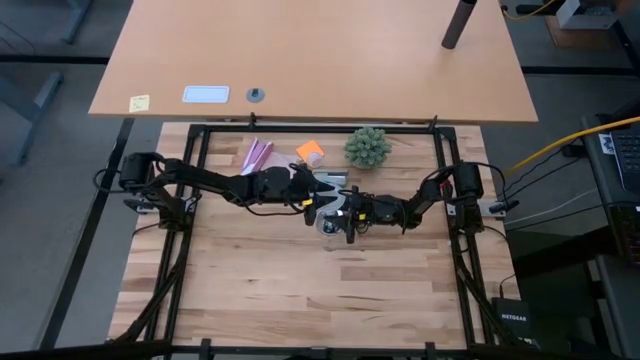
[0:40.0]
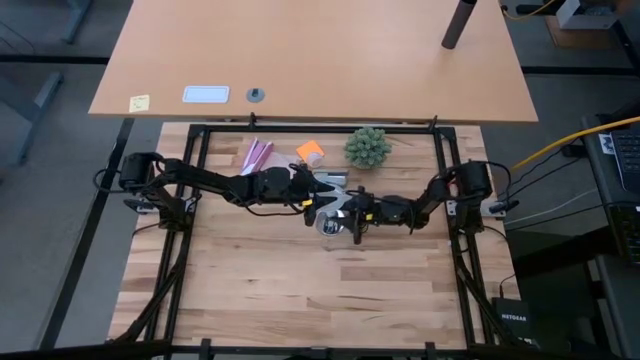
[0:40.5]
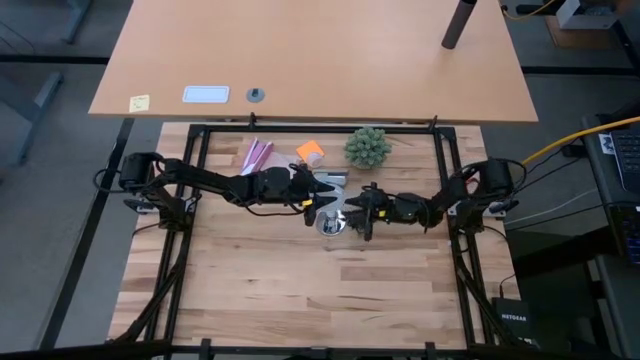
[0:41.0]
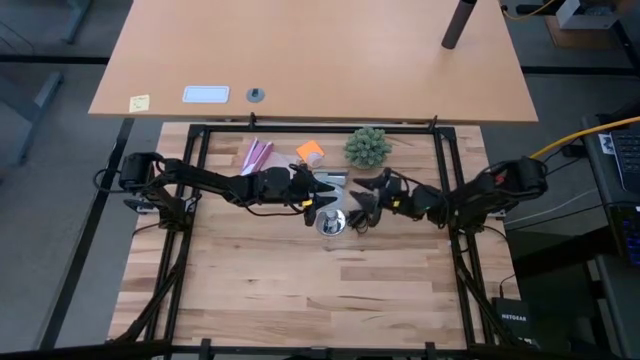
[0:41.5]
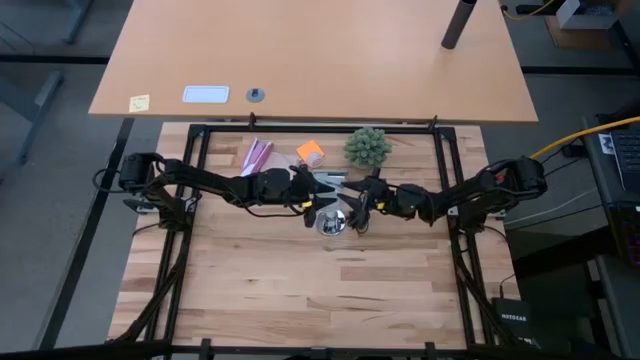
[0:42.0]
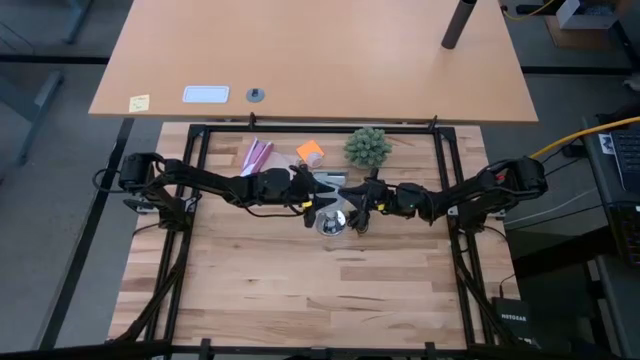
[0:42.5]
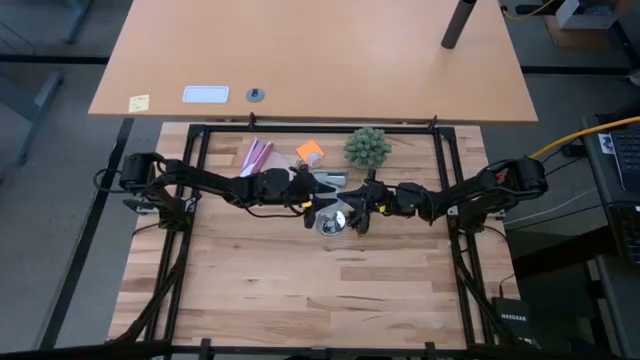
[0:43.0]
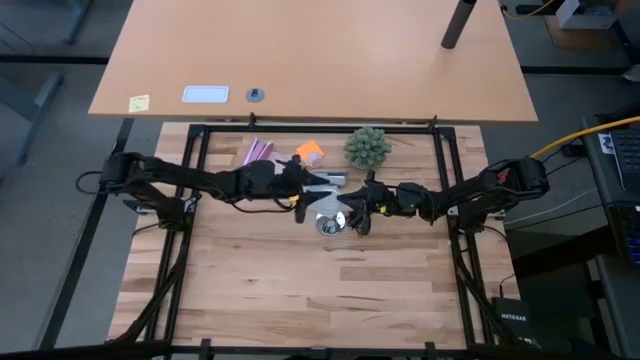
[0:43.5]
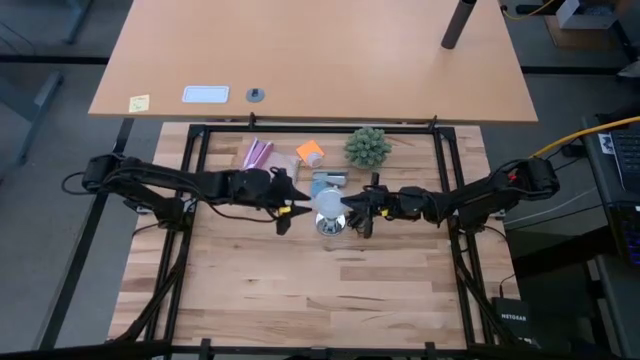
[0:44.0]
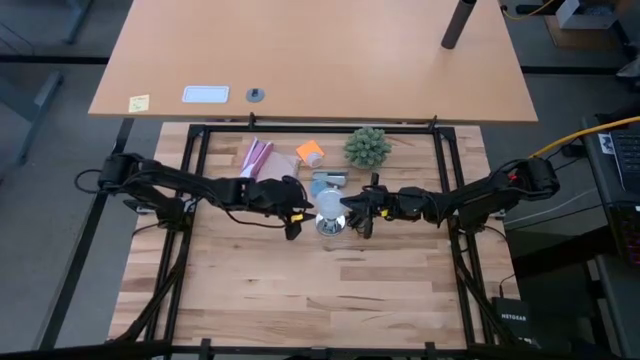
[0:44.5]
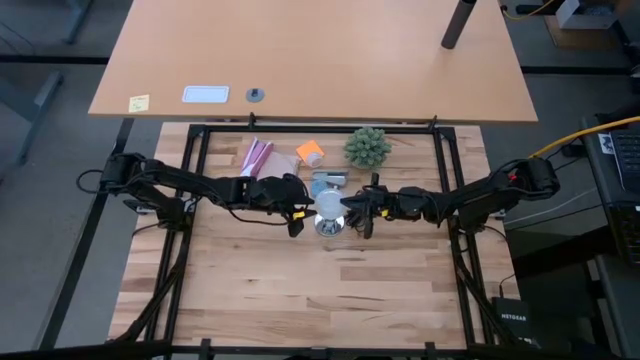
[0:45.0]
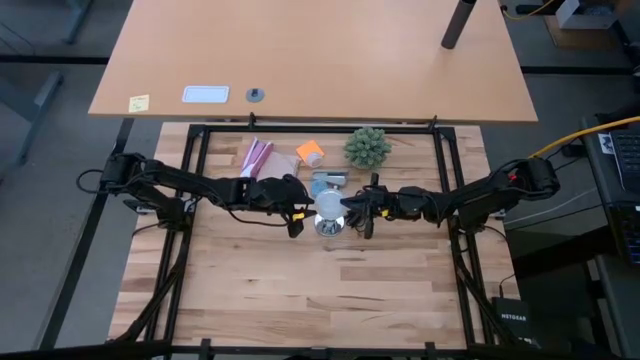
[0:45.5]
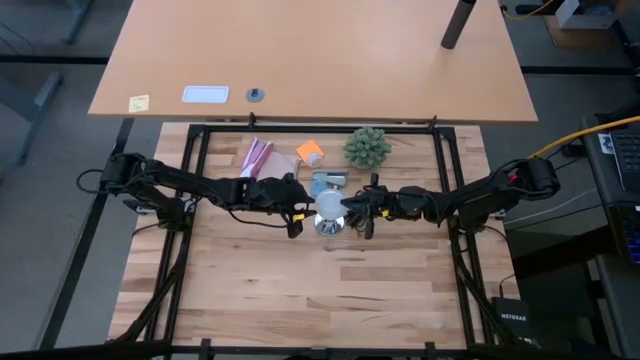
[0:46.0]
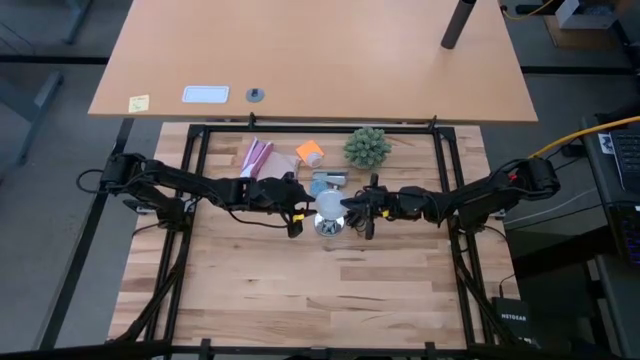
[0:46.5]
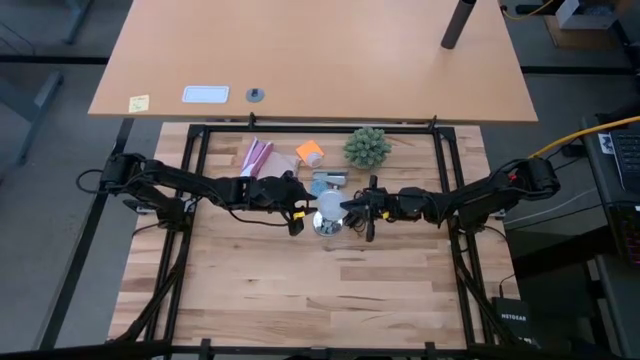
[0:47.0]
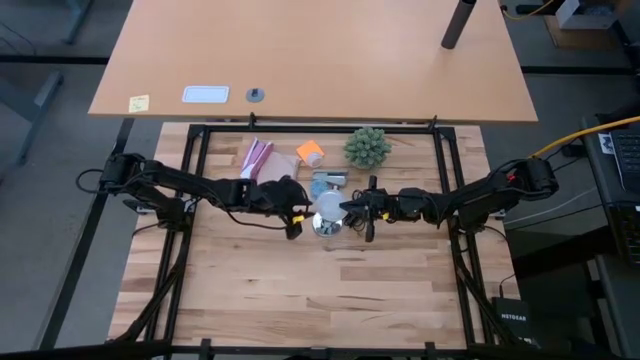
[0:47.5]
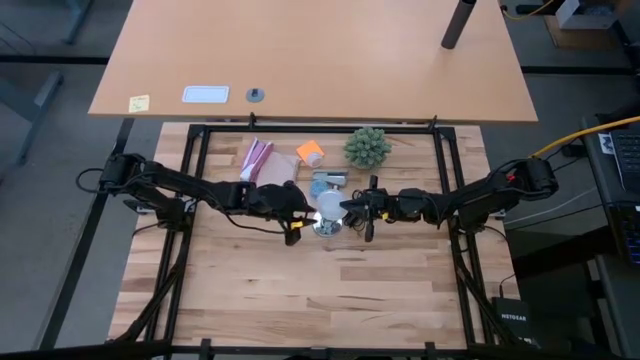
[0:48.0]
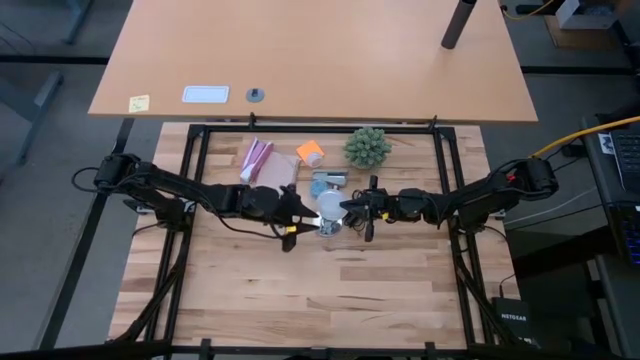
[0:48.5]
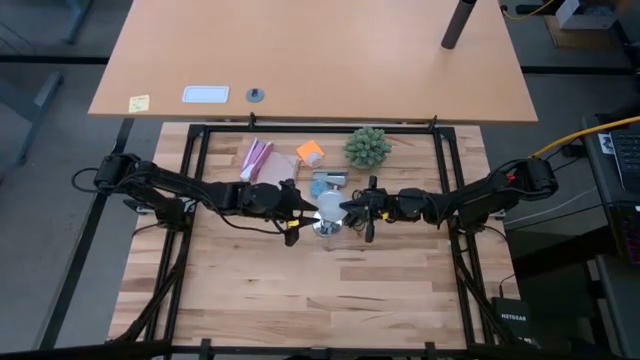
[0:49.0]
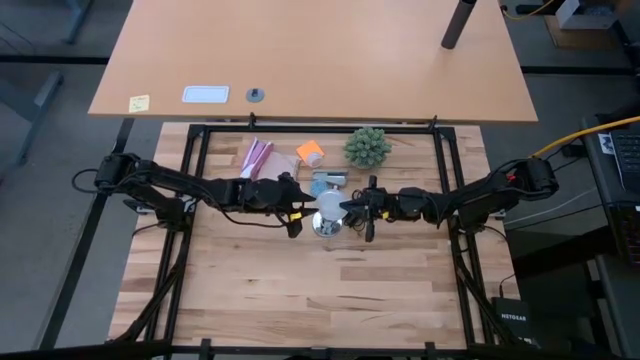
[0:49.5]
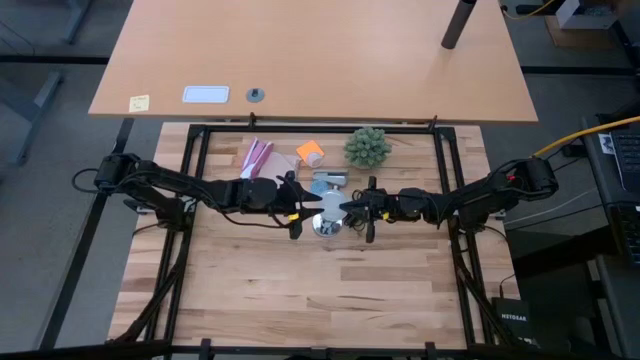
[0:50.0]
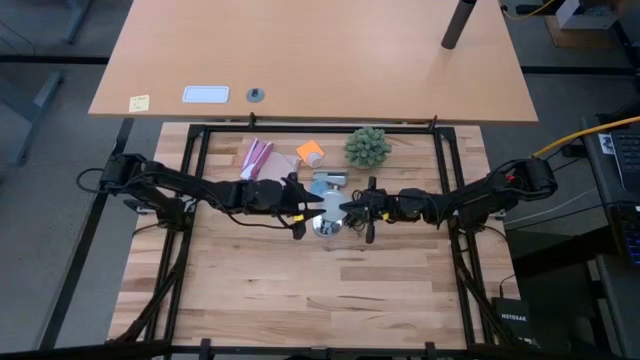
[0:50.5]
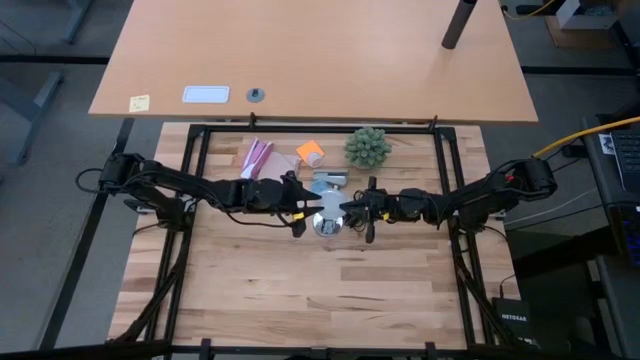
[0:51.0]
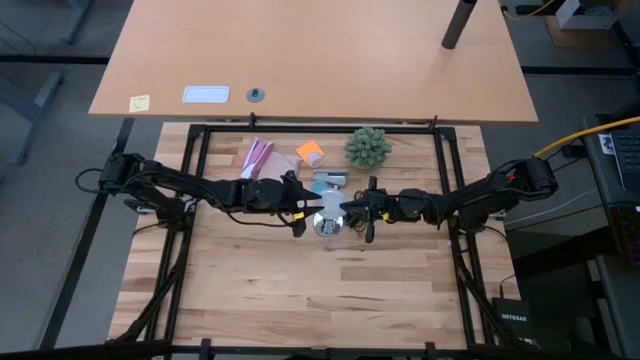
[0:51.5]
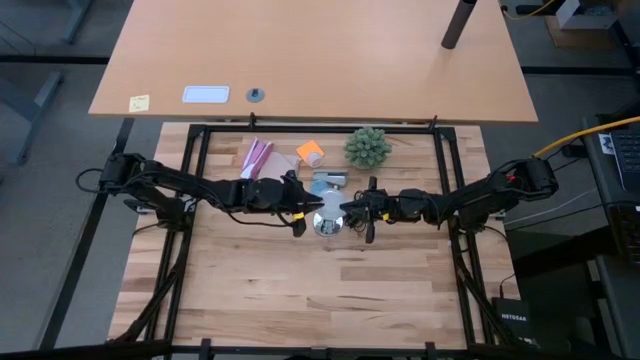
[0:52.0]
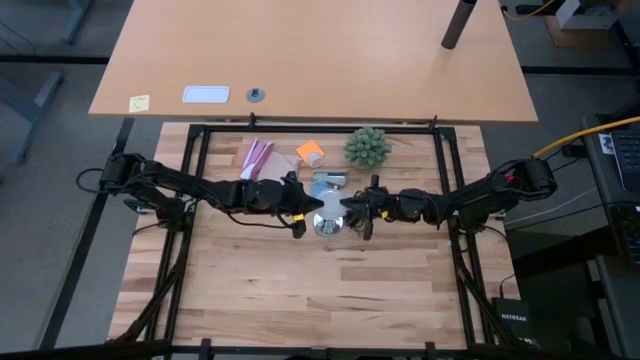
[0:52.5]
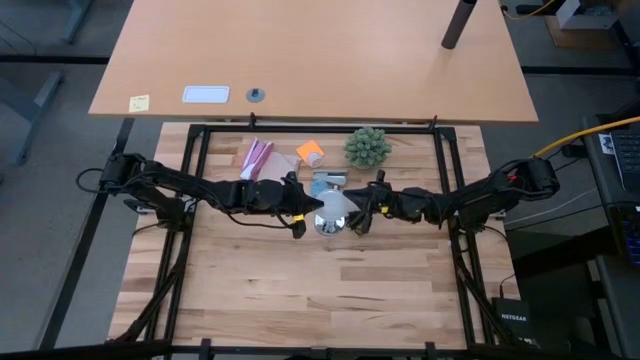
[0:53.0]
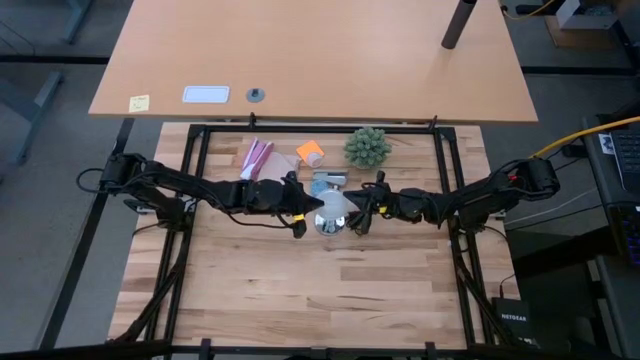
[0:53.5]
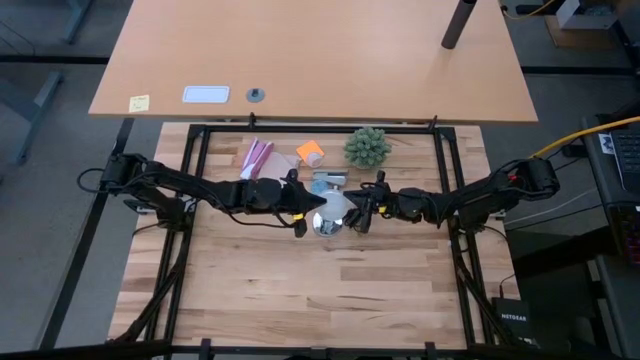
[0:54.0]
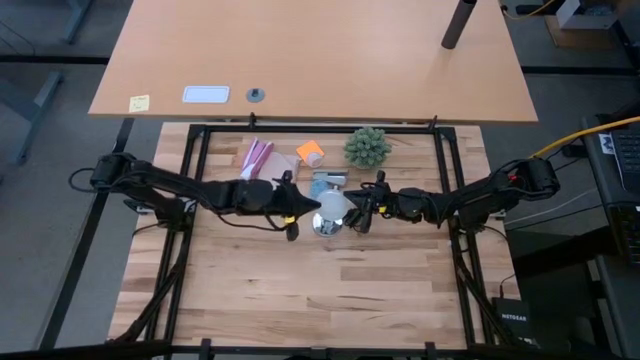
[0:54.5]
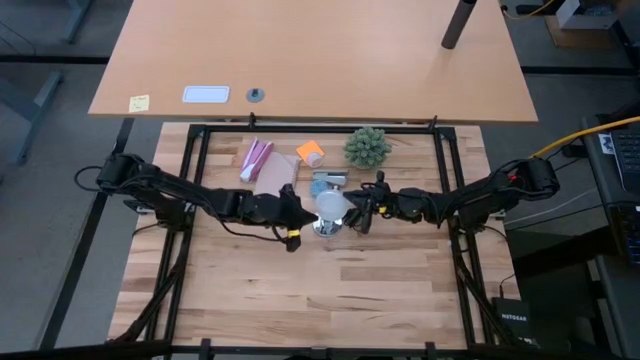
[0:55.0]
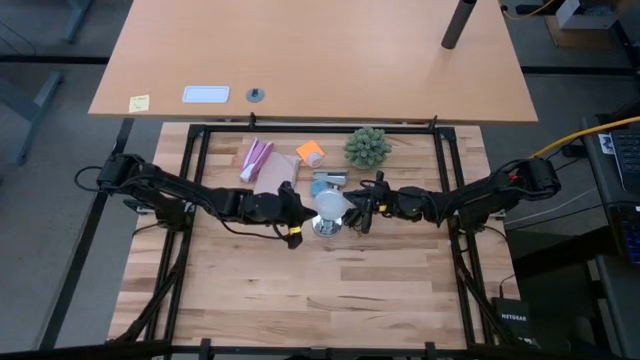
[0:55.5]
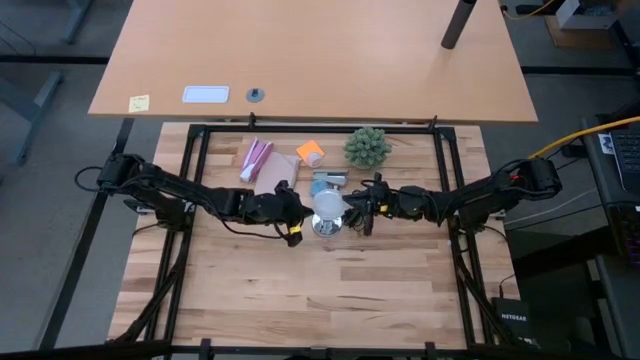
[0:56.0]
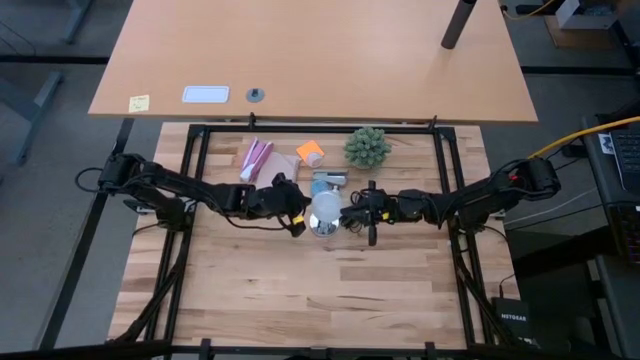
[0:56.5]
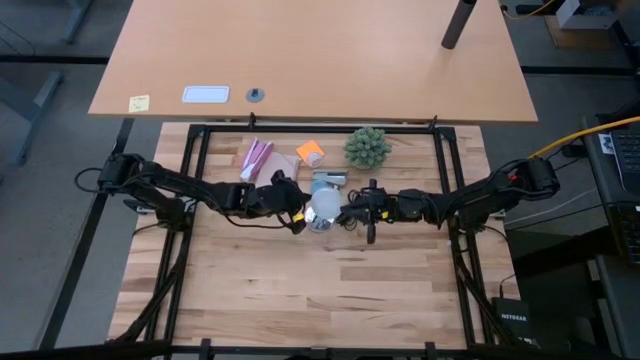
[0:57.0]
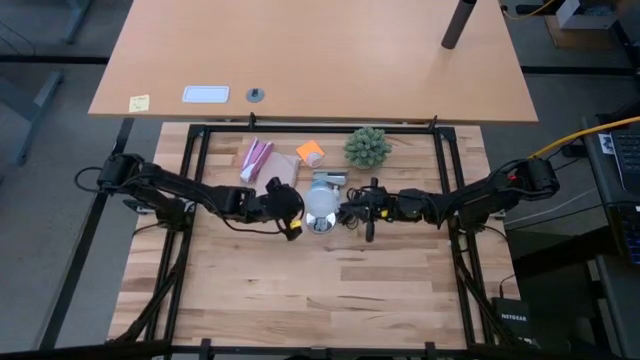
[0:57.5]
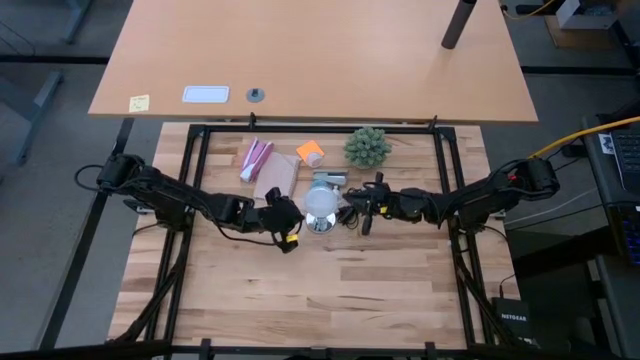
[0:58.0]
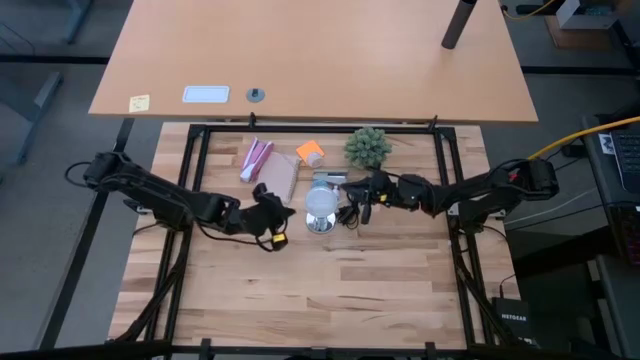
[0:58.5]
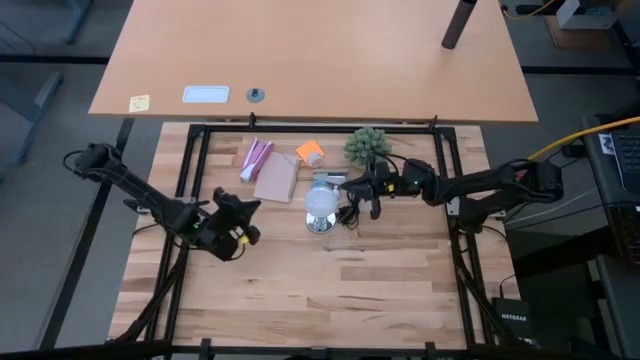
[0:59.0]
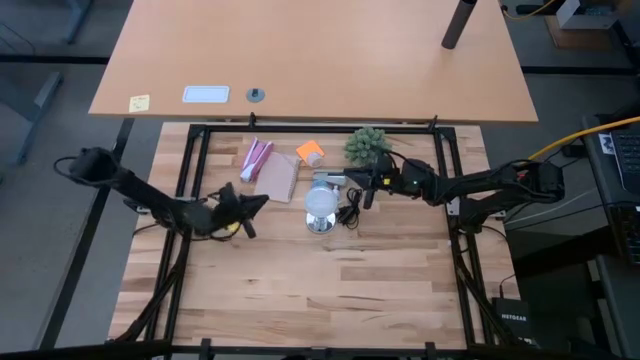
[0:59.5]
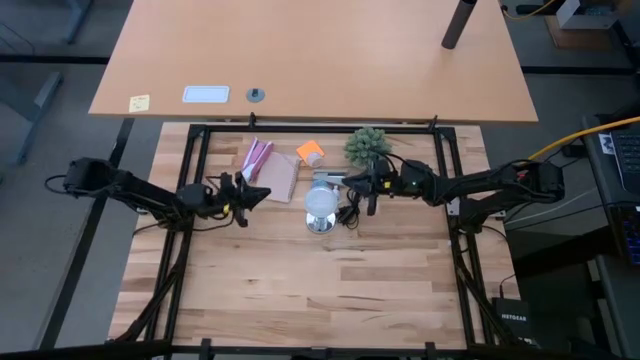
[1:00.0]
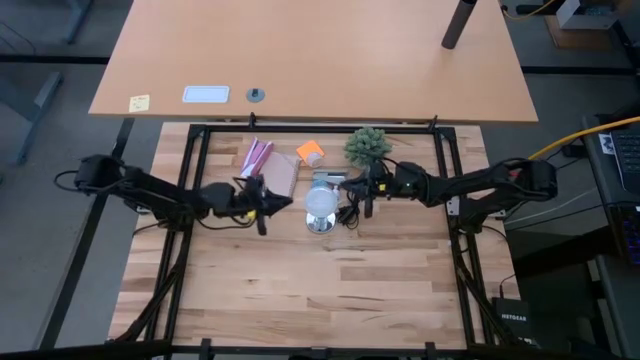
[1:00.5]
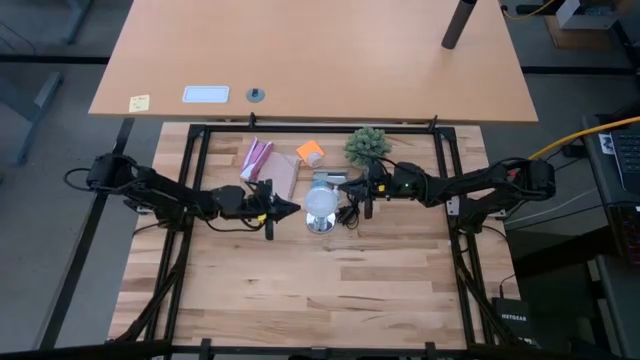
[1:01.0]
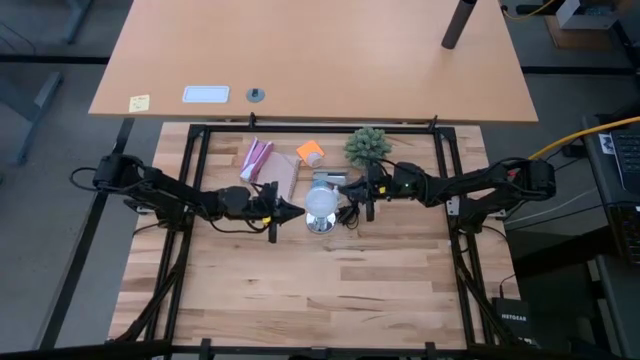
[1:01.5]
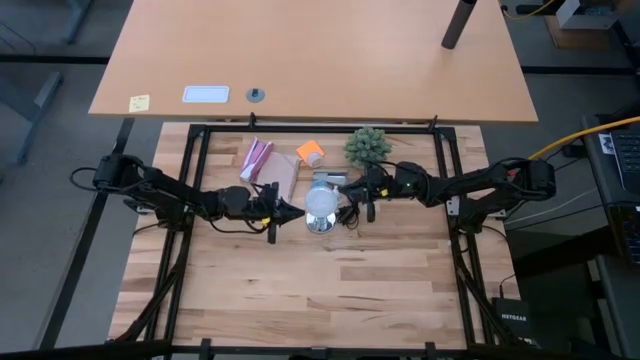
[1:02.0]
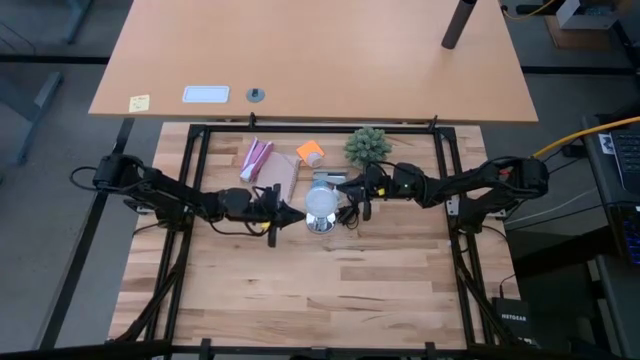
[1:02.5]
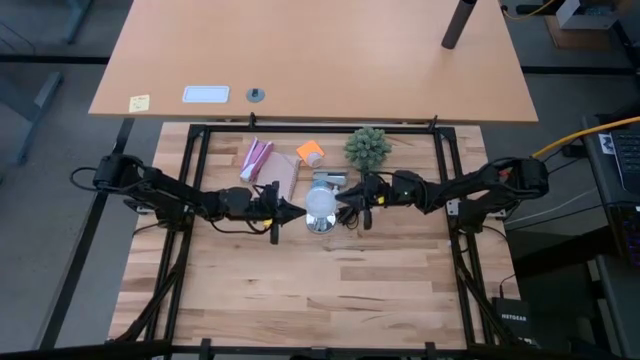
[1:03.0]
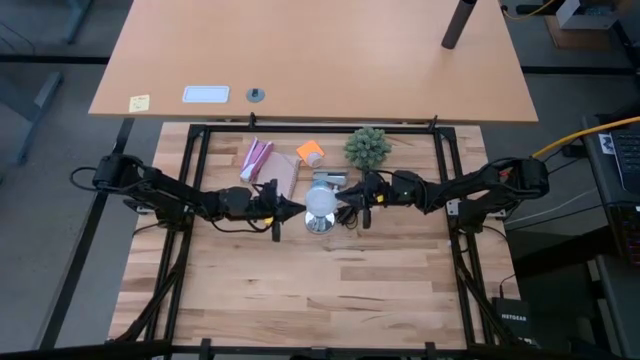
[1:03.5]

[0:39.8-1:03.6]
Task: Screw lightbulb
Insert the lightbulb into the silver lamp socket
